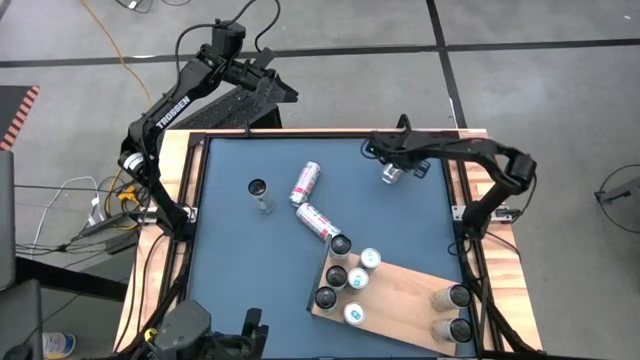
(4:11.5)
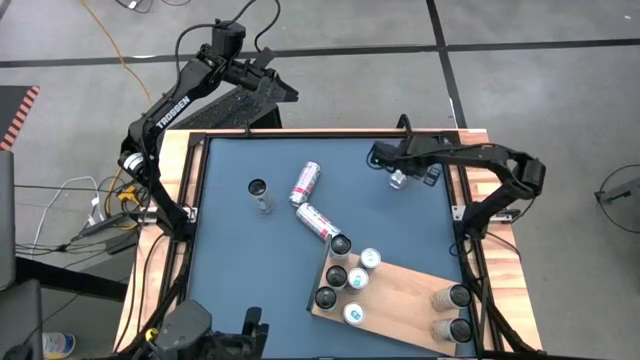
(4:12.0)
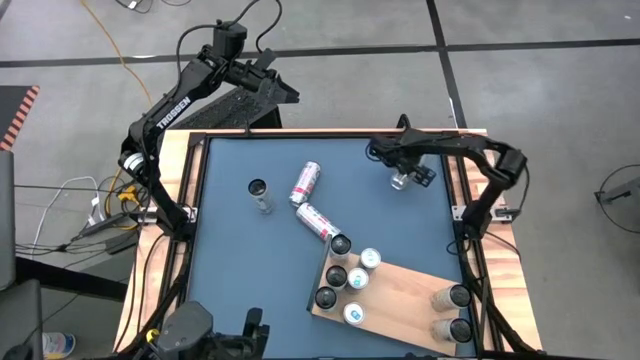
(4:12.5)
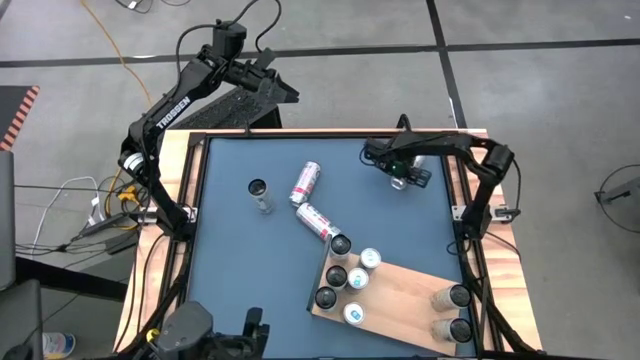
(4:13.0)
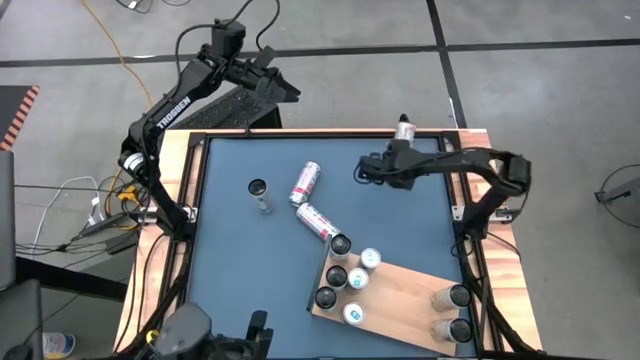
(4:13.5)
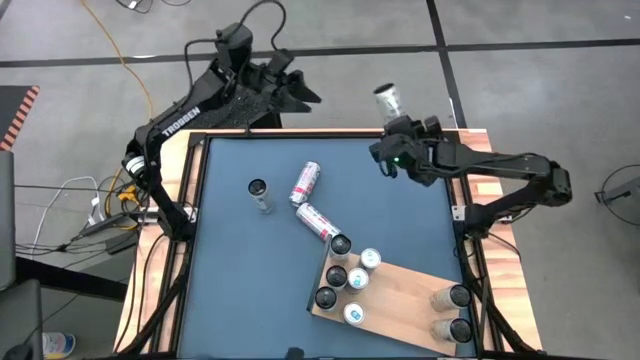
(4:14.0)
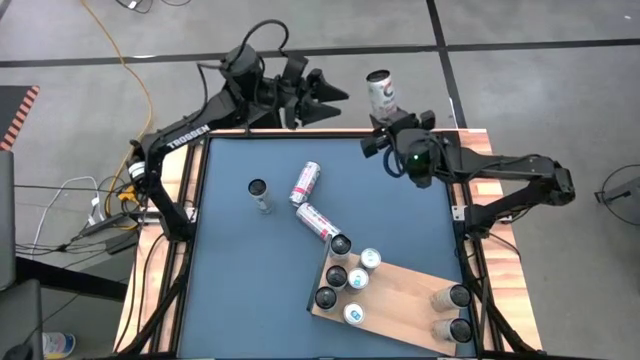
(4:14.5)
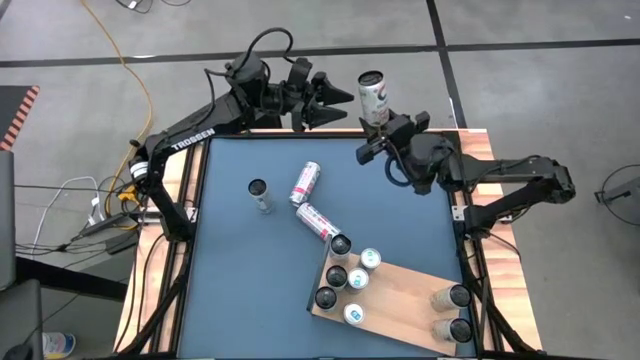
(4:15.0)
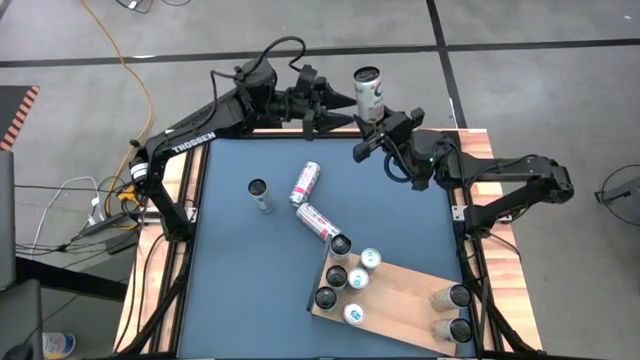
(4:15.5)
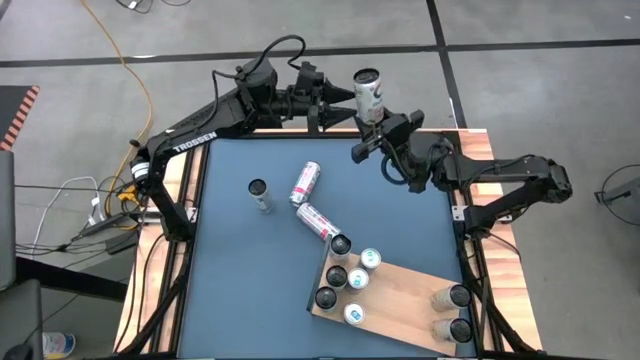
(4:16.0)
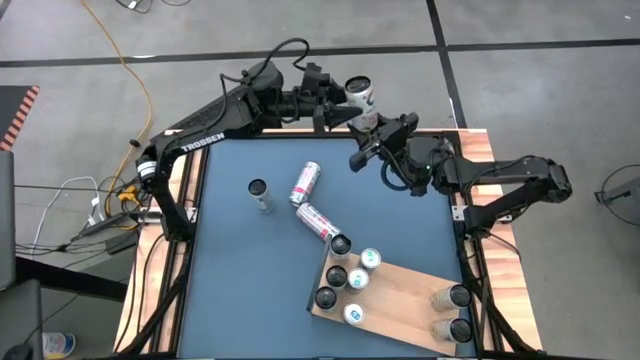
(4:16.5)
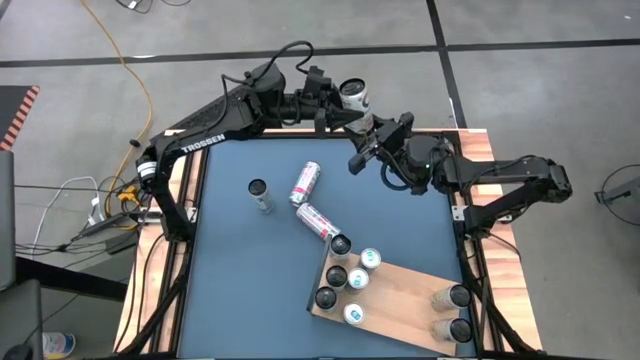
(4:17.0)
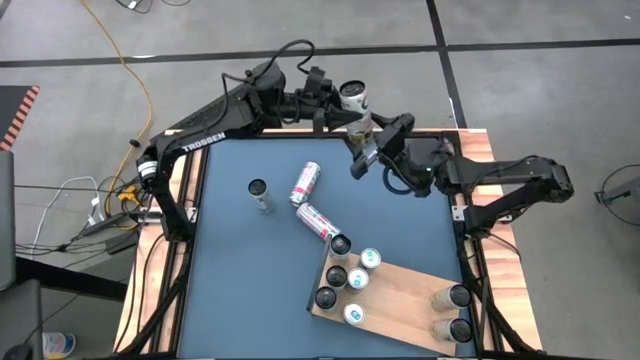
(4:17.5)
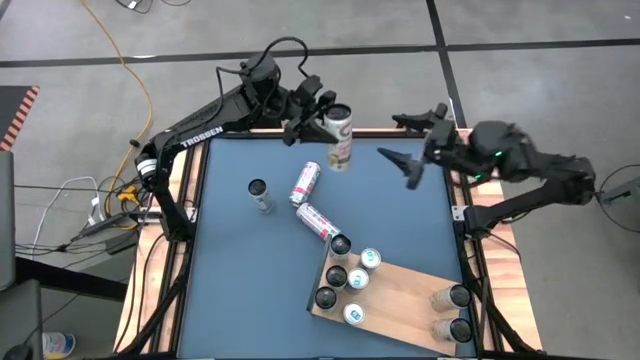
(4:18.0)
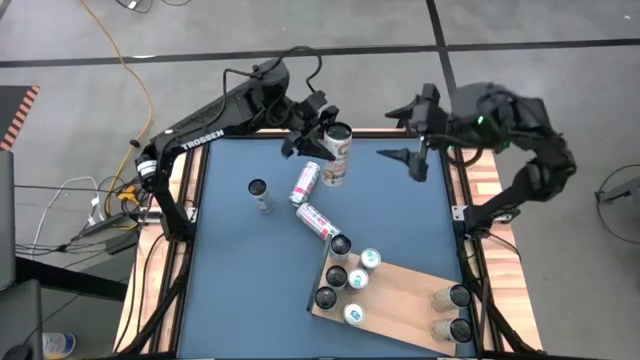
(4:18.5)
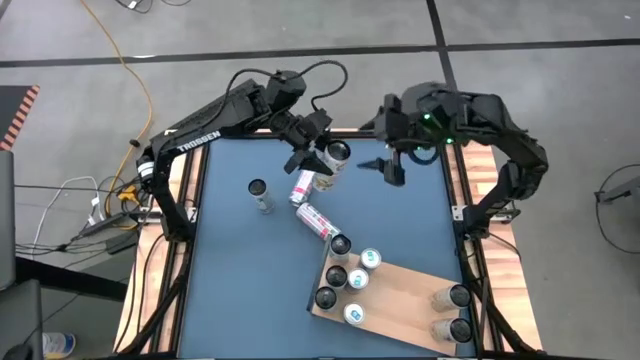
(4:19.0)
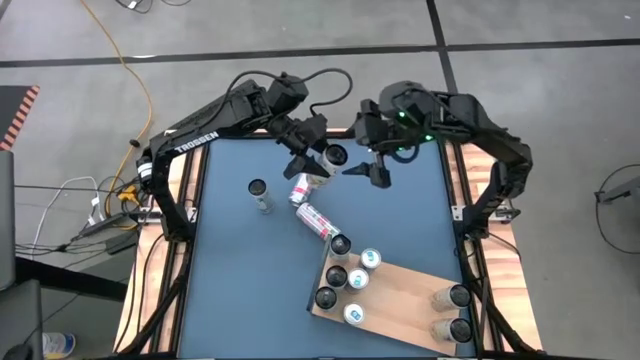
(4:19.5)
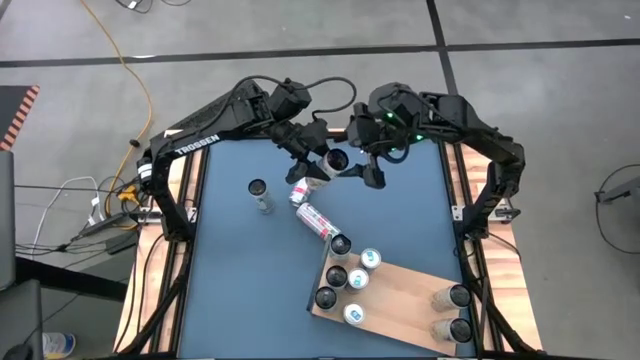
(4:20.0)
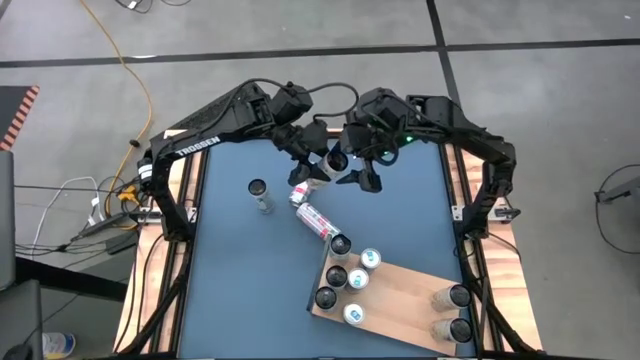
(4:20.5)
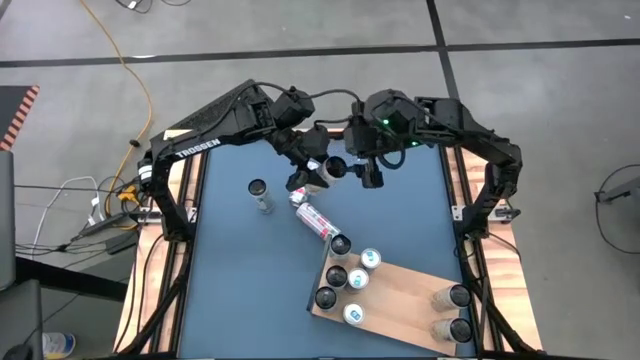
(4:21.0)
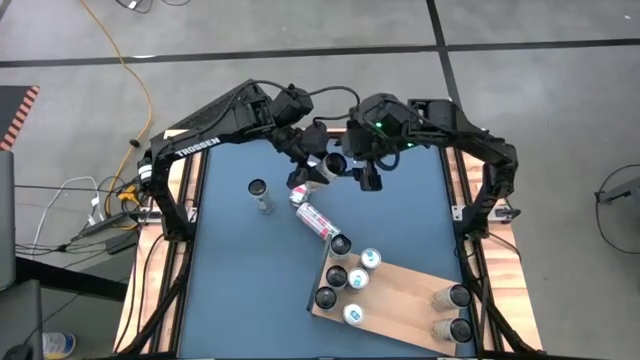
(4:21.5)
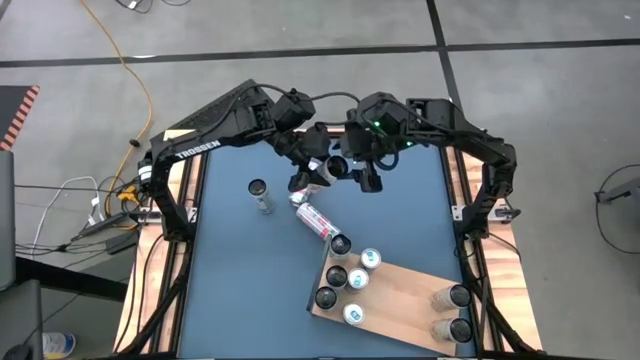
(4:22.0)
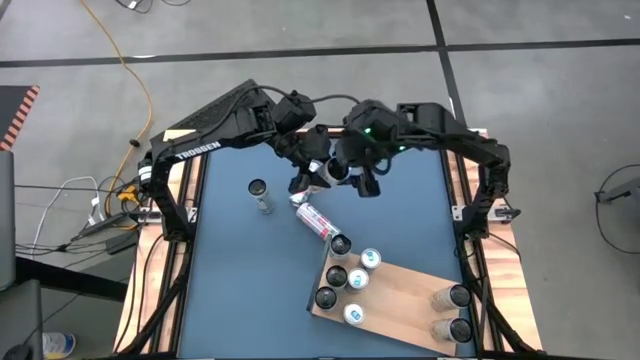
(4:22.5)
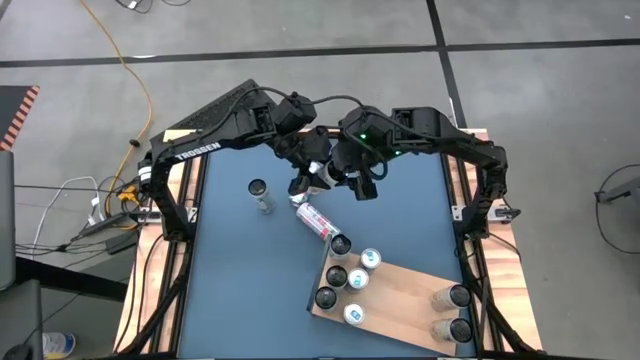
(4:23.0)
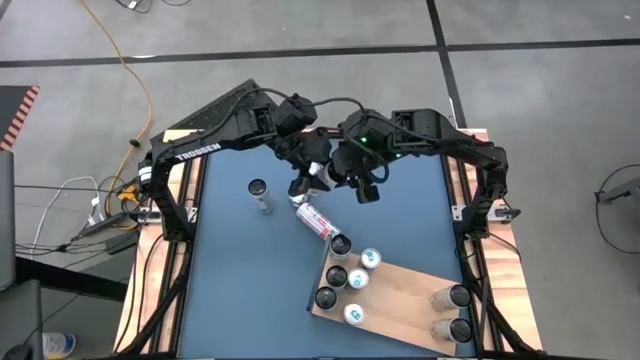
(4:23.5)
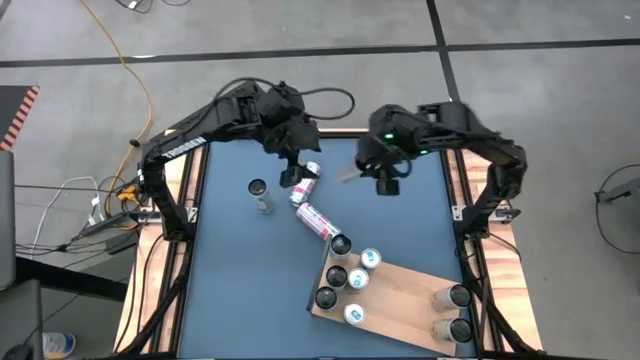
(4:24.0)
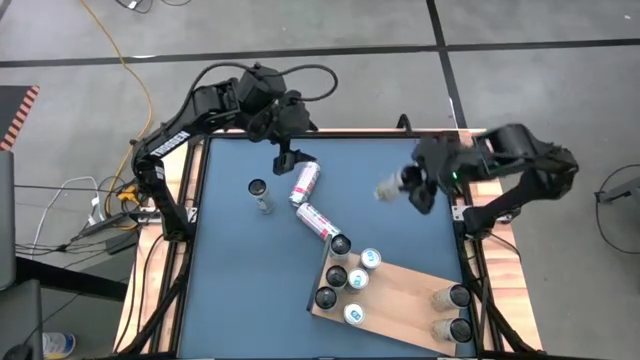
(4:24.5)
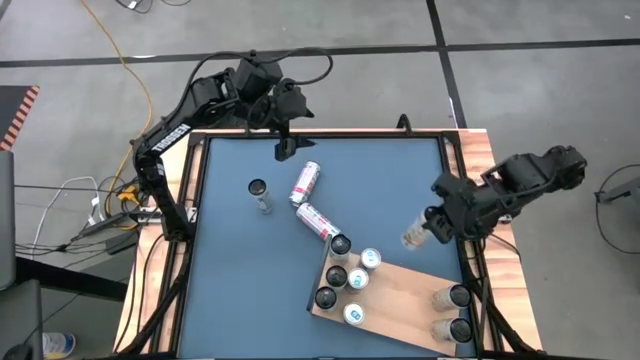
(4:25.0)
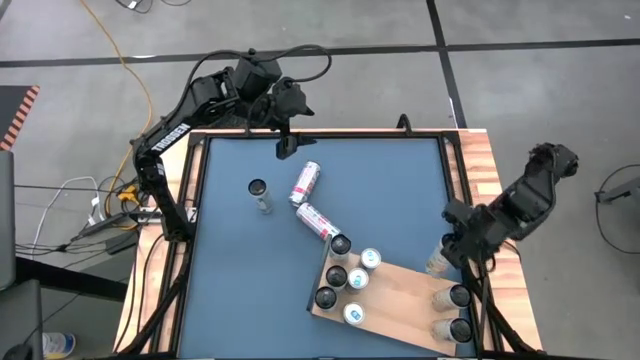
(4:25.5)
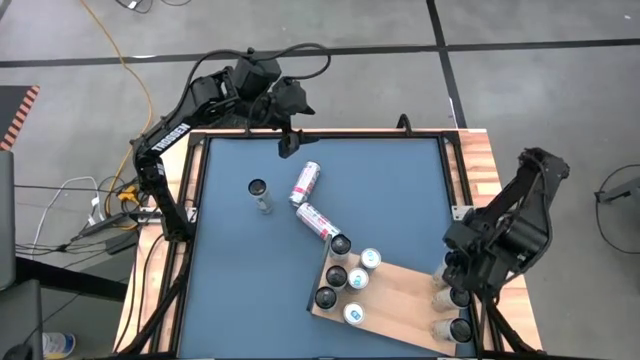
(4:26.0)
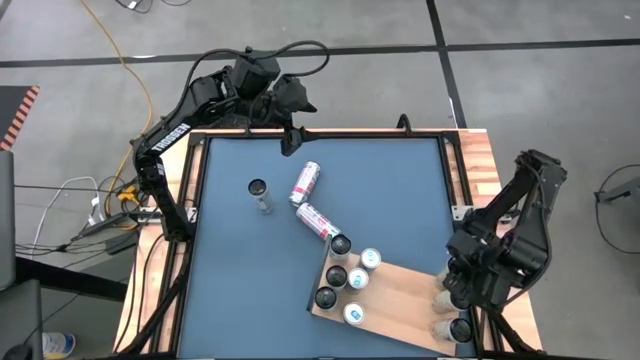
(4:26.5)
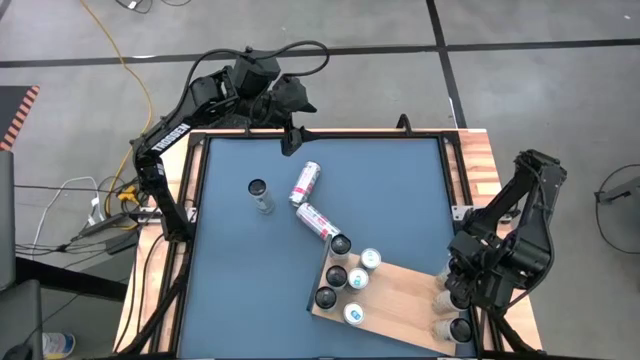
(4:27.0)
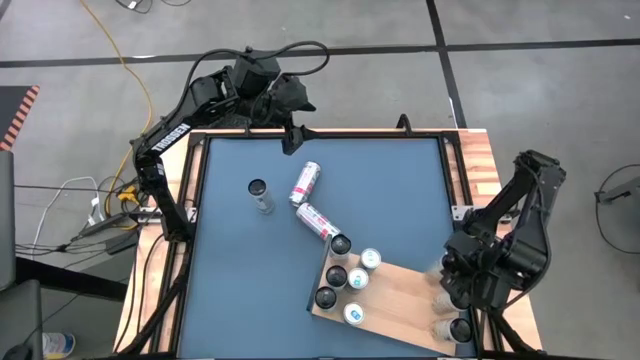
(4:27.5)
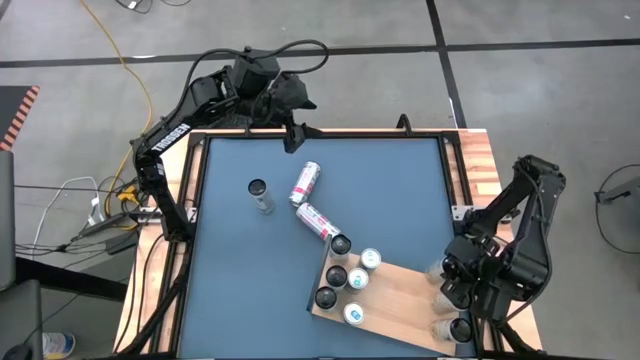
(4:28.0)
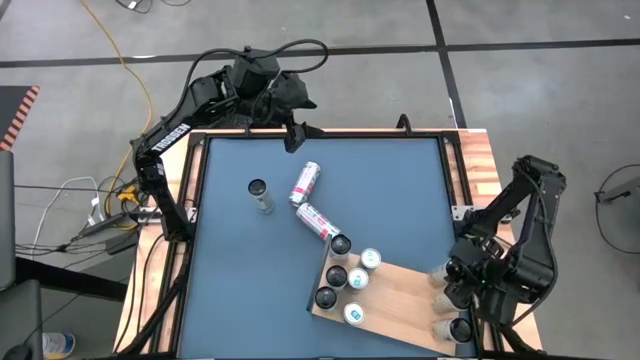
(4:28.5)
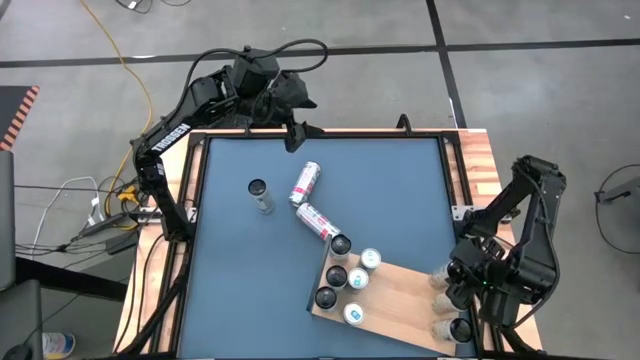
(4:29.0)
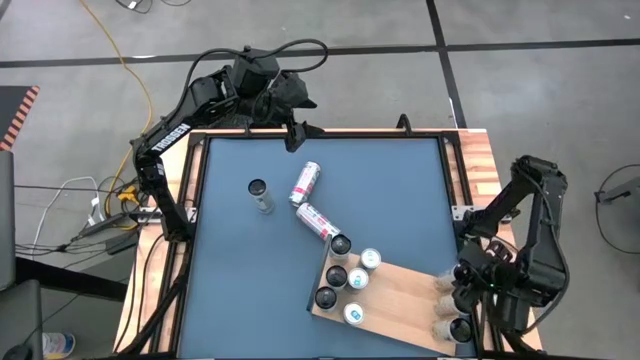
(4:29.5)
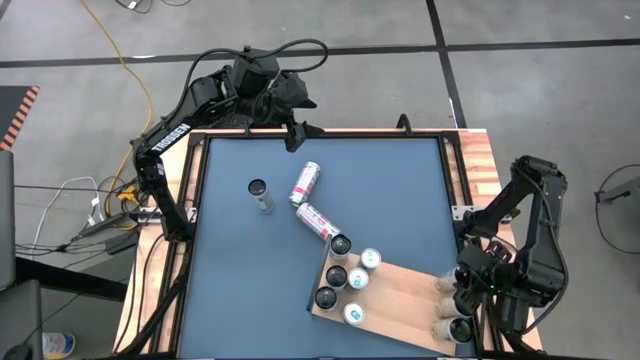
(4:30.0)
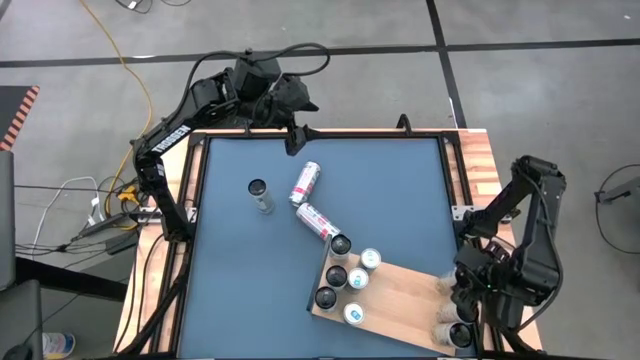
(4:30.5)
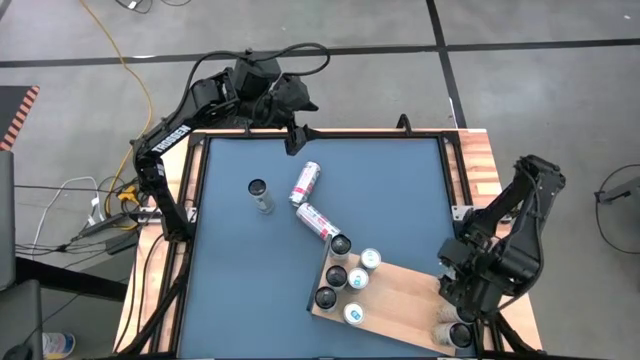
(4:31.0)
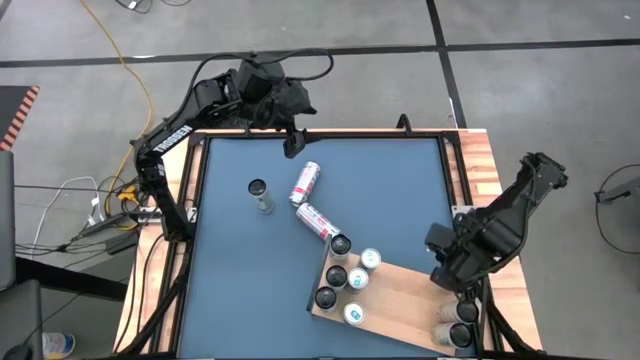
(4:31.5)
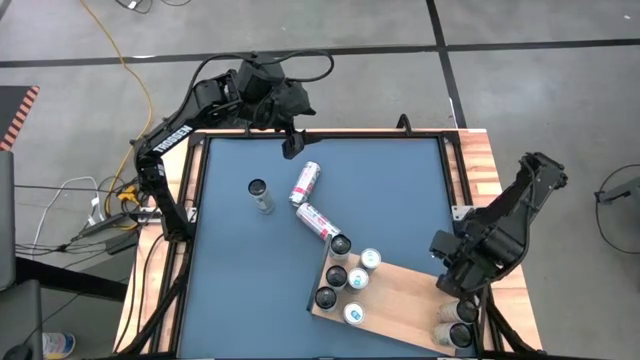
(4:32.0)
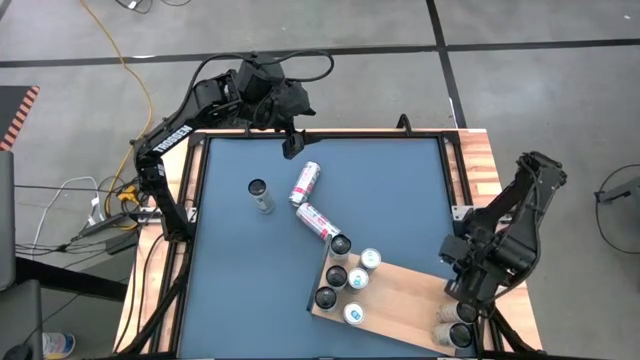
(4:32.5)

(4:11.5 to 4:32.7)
Task: Place canned beverage on shelf
Put the white yellow soda can on the shelf

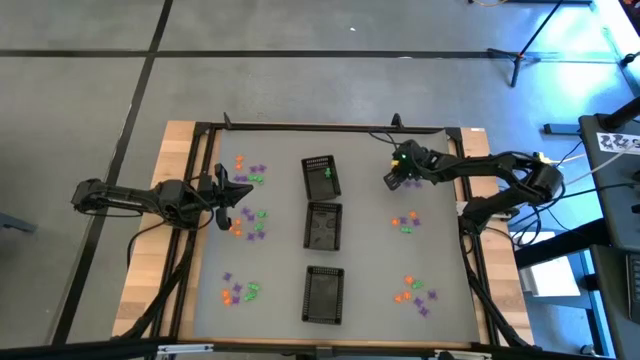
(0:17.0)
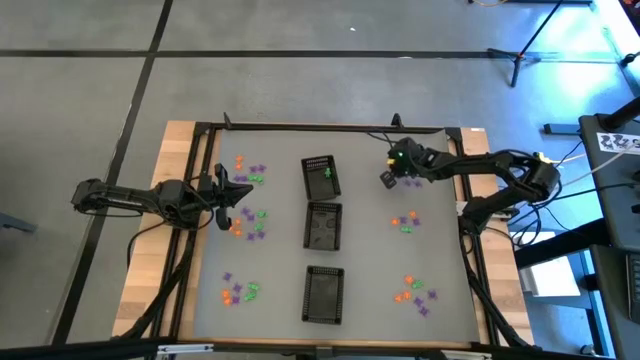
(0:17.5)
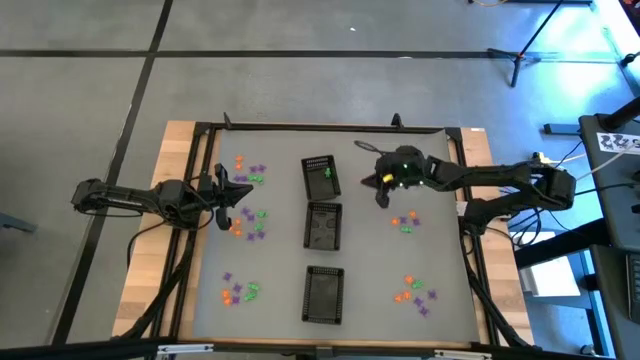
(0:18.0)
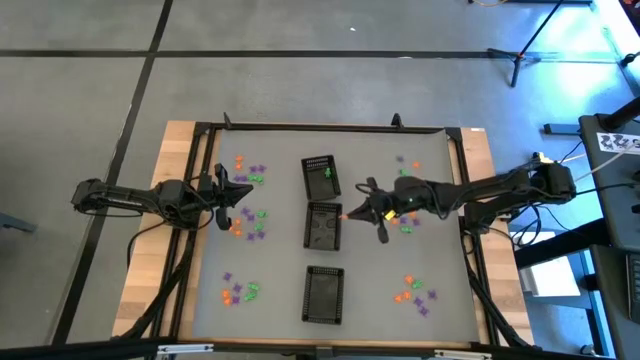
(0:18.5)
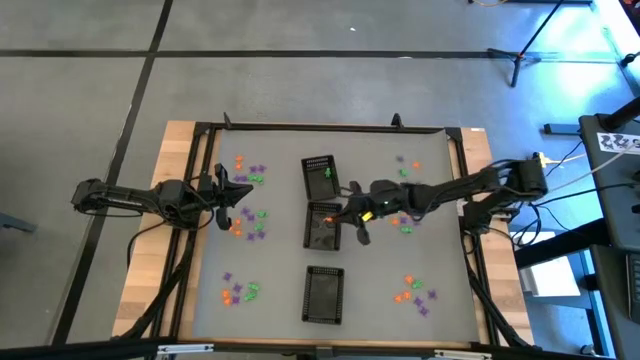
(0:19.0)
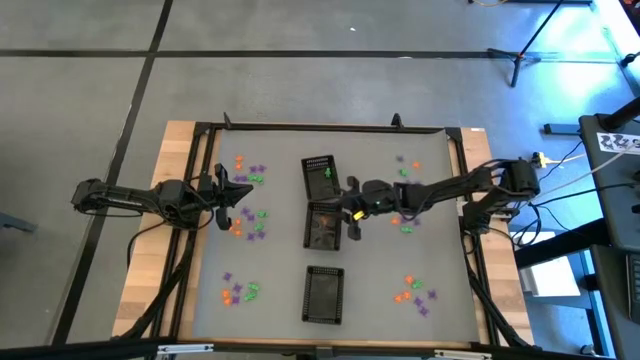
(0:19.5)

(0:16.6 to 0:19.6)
Task: Sort Halloween decoration
Put the orange spider toy into the middle black bin
